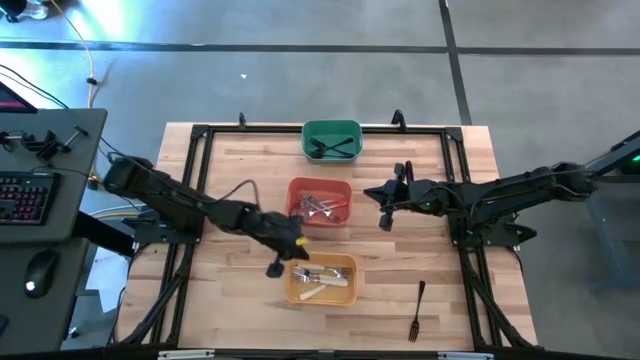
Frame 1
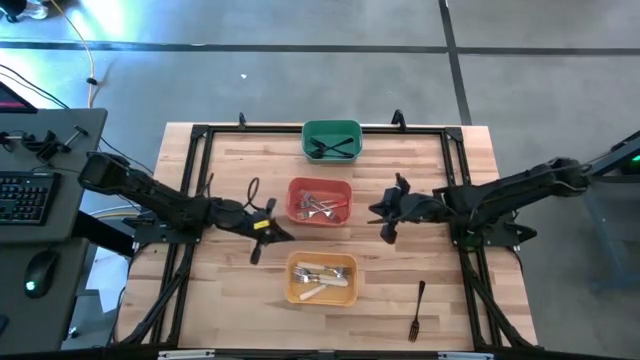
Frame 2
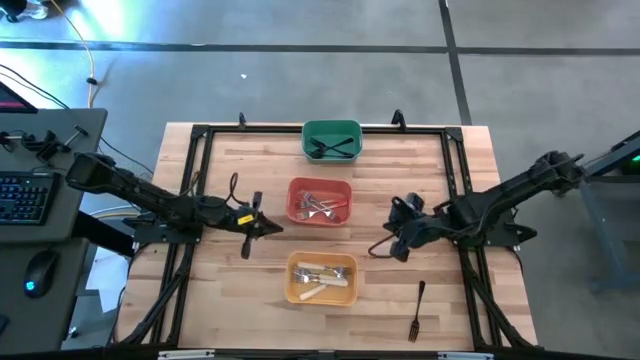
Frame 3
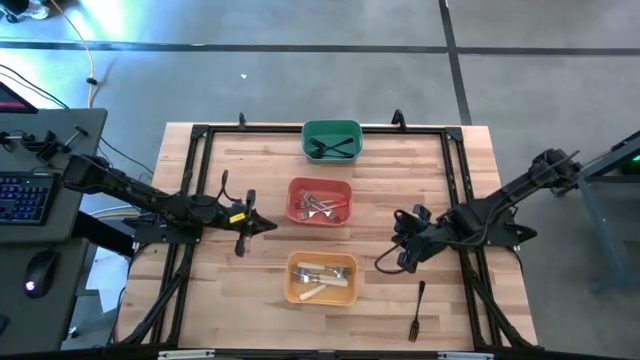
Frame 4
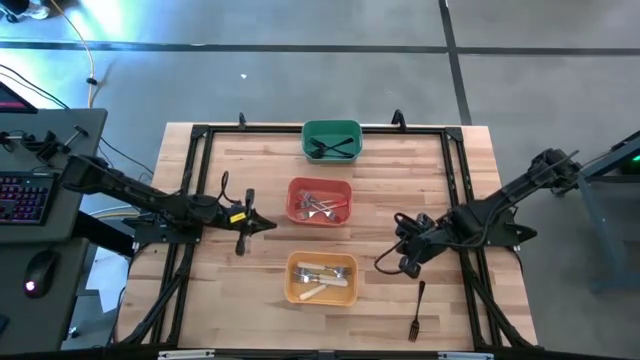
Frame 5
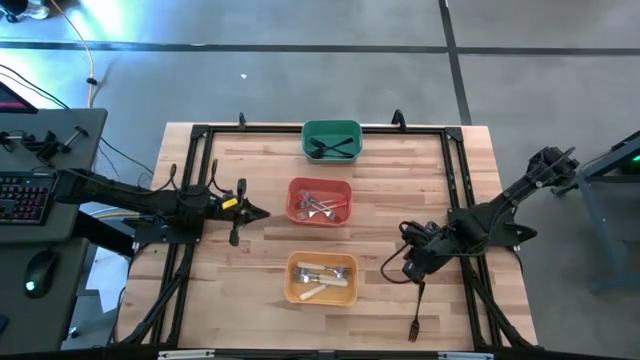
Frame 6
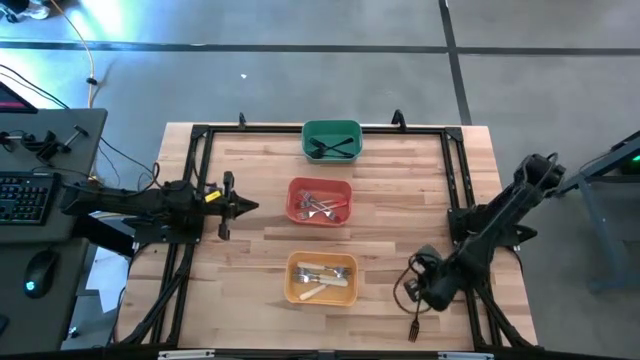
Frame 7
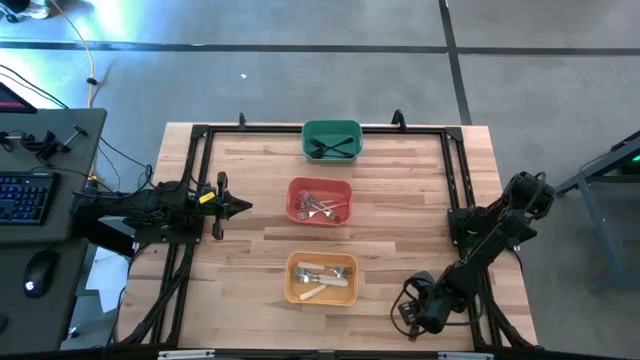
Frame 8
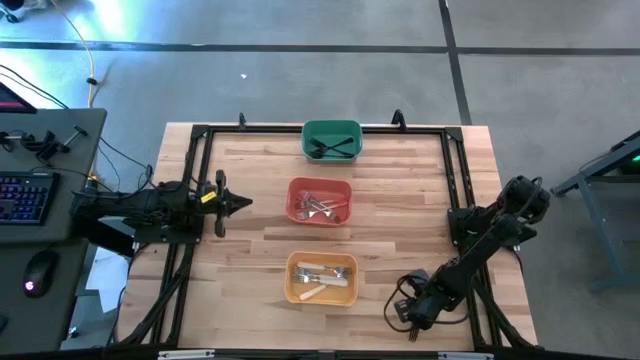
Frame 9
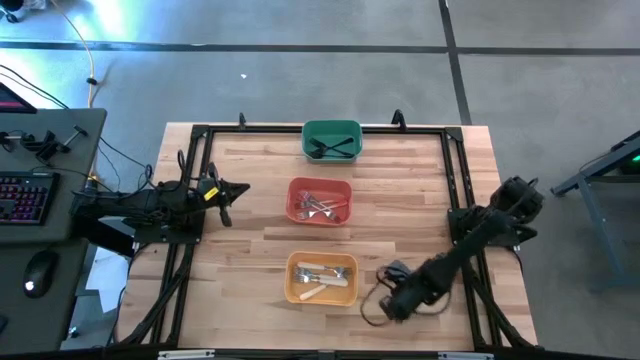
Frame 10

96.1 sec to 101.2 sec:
Task: Sort silverware by color (type)
Put the black fork into the green bin

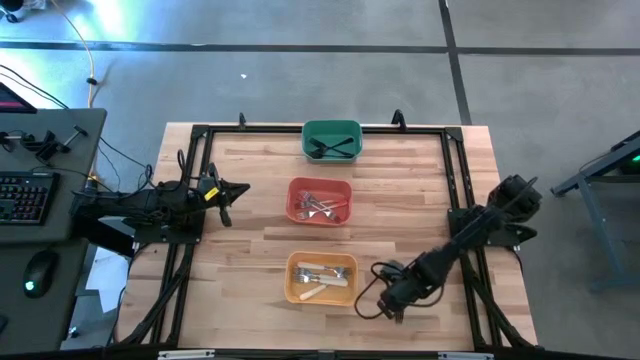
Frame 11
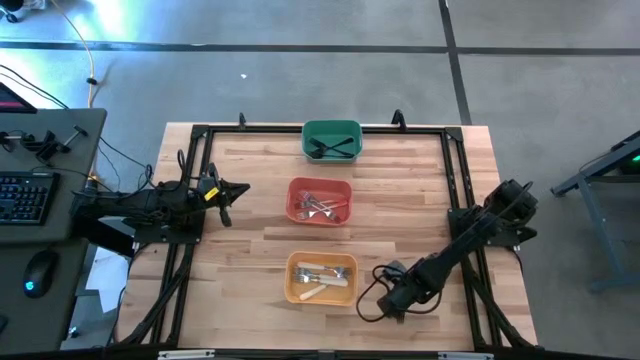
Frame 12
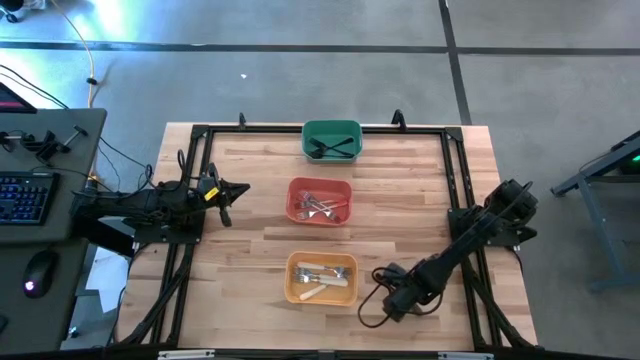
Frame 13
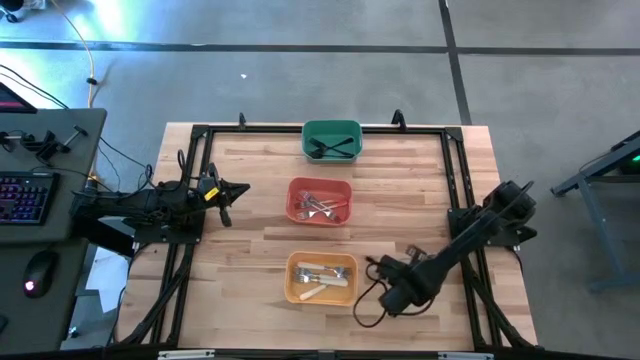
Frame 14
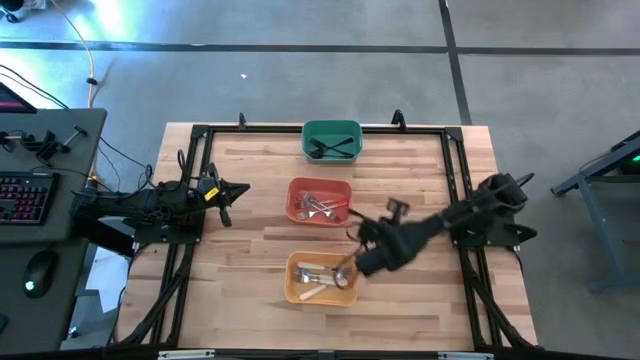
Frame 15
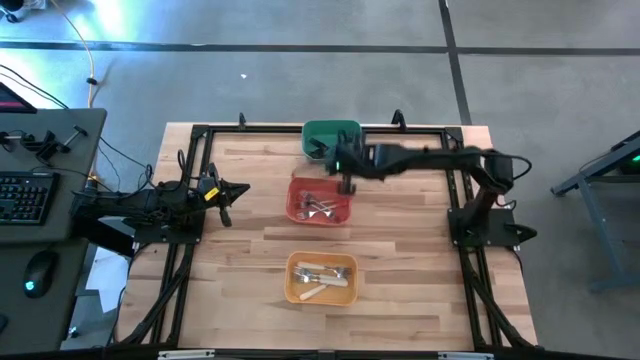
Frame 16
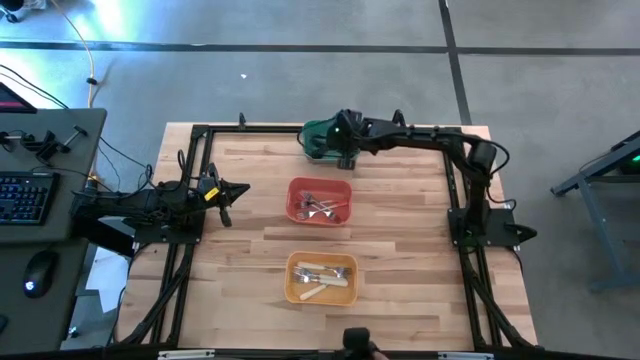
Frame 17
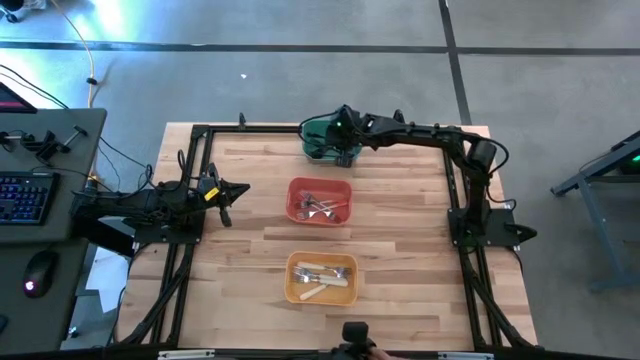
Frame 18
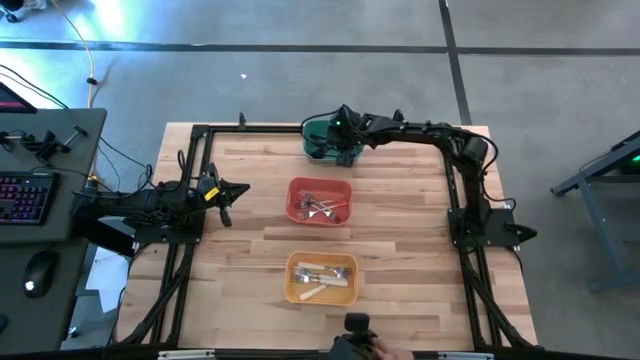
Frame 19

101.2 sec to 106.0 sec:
Put the black fork into the green bin

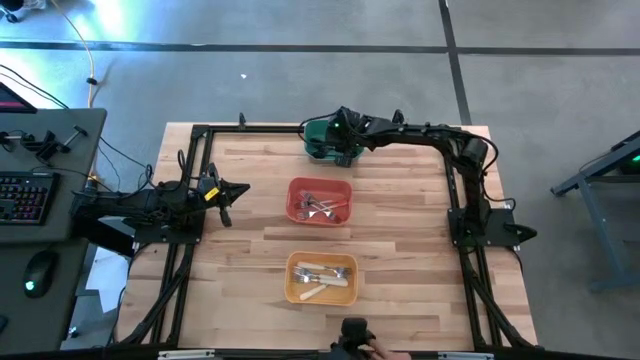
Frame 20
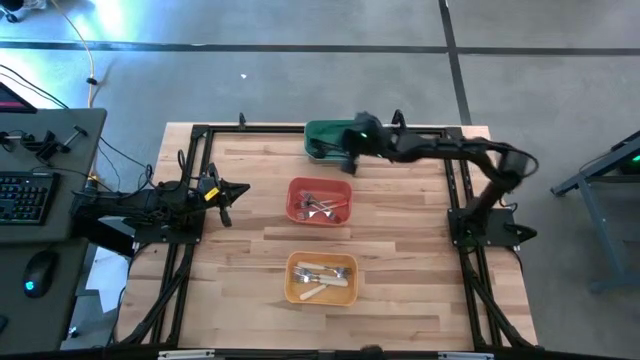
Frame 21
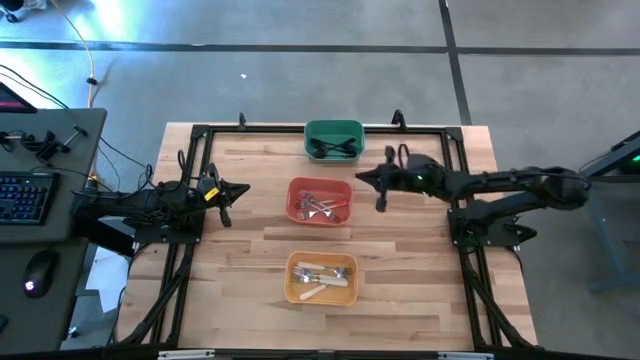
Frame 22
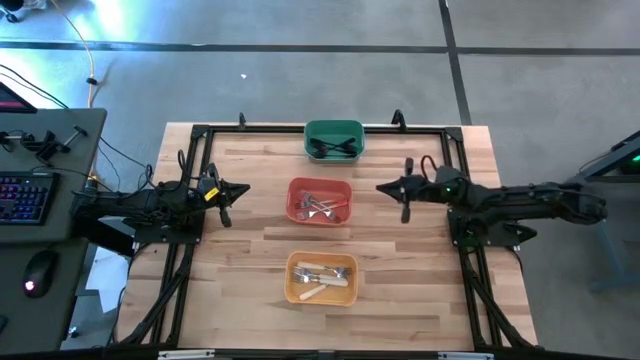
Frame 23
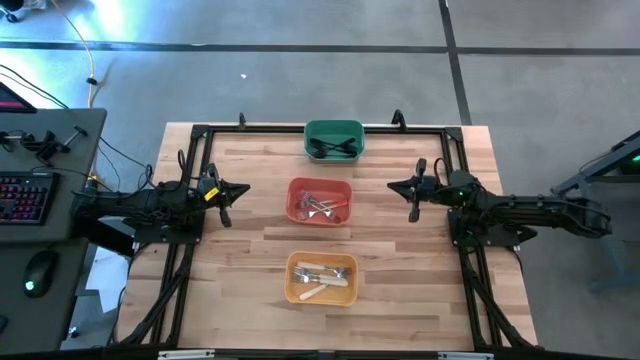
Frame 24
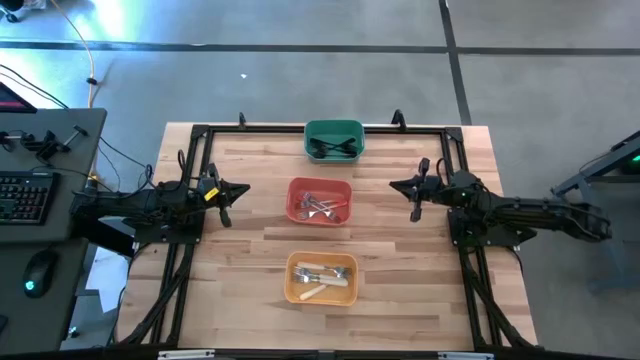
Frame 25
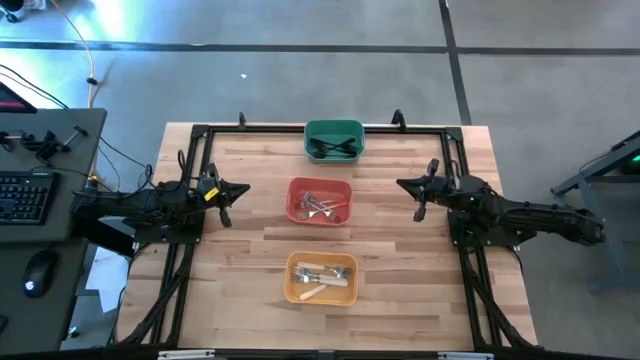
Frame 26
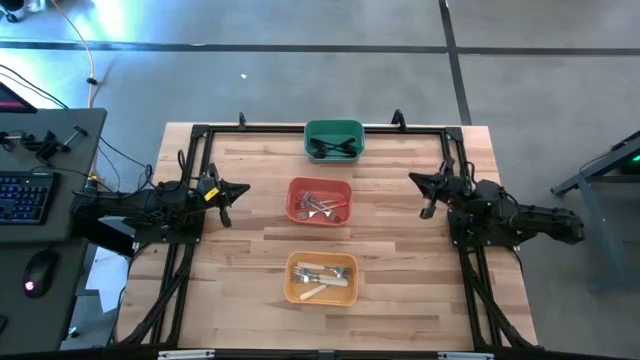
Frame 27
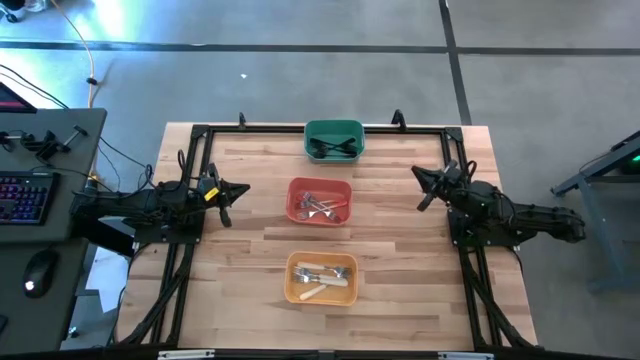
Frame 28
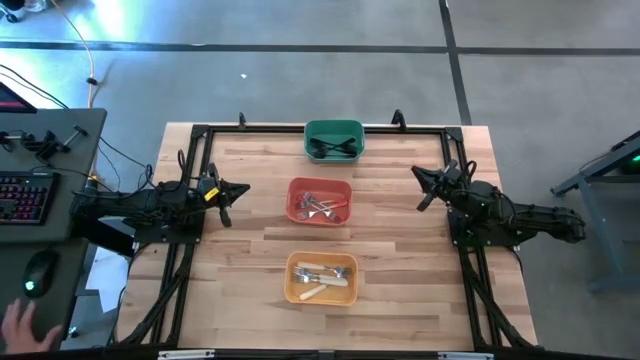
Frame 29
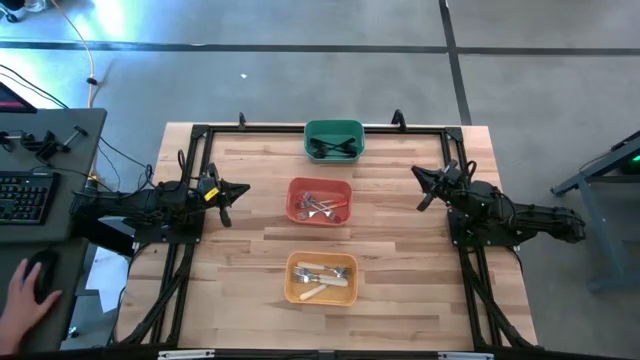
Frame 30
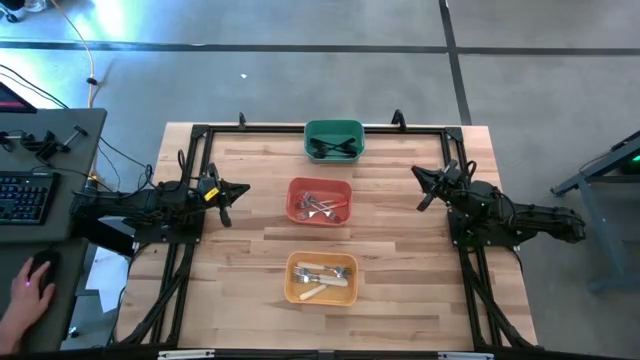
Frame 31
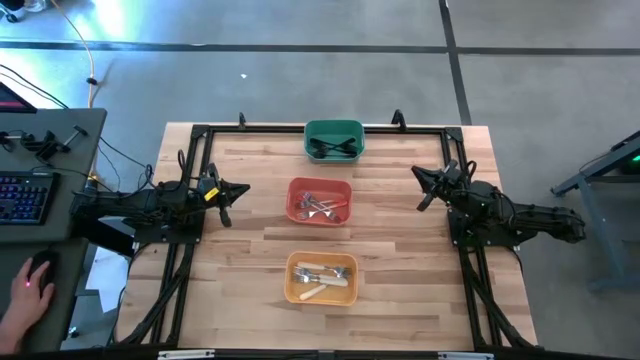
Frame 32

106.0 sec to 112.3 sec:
Return to Home Position

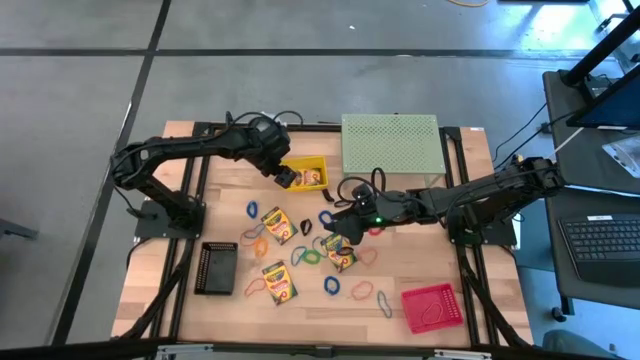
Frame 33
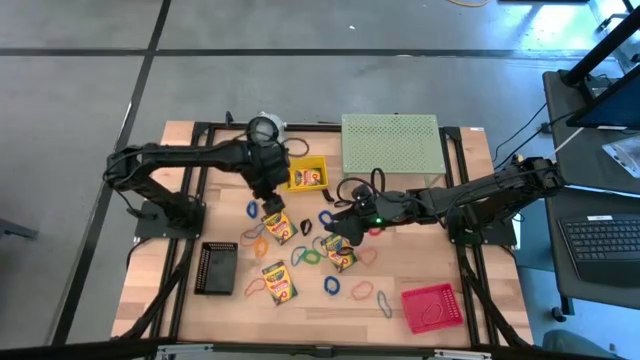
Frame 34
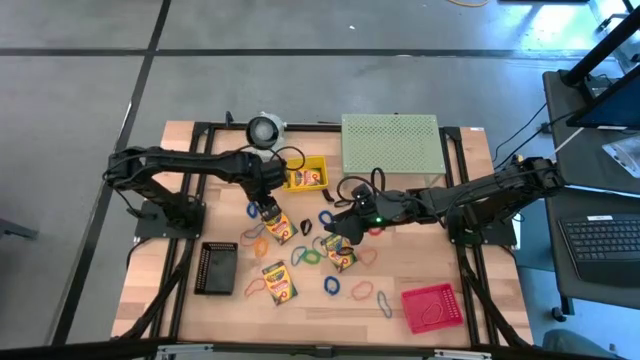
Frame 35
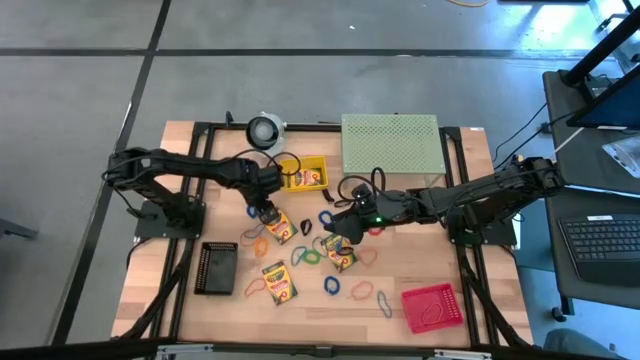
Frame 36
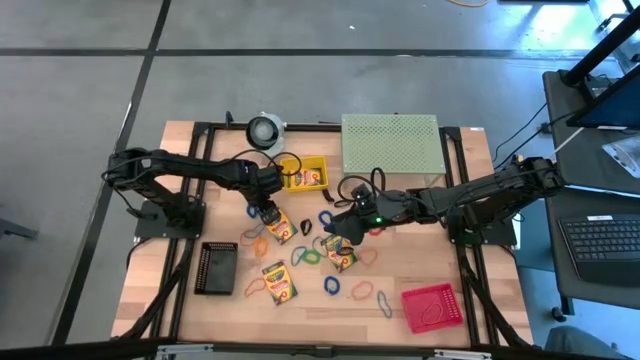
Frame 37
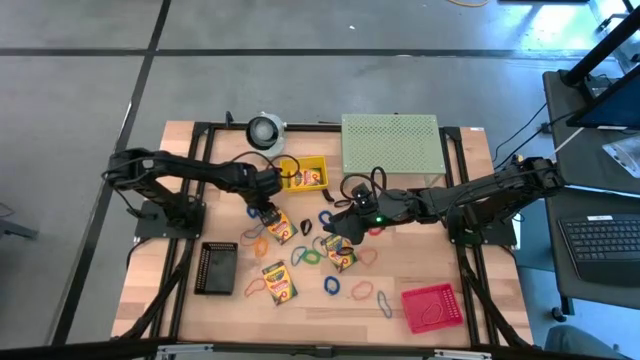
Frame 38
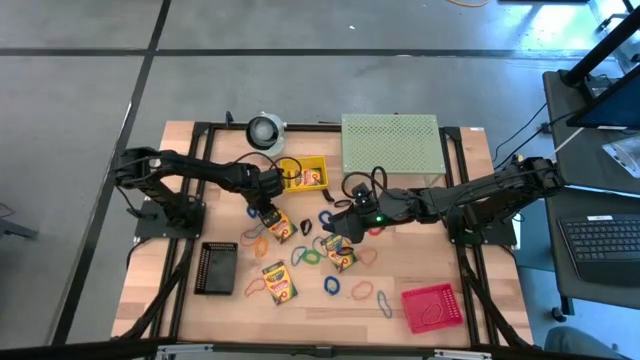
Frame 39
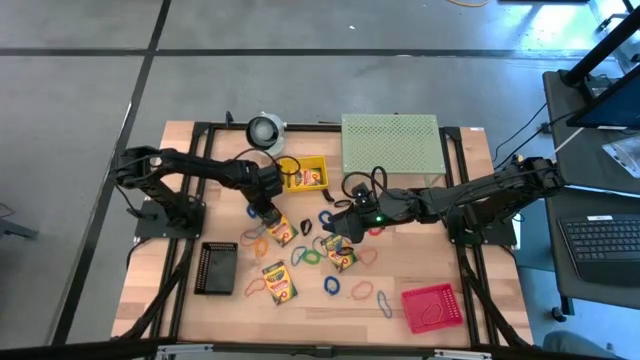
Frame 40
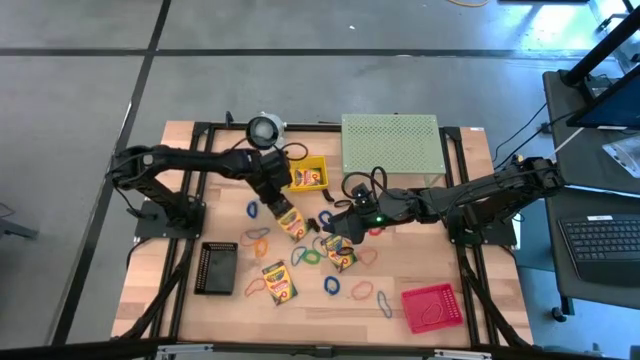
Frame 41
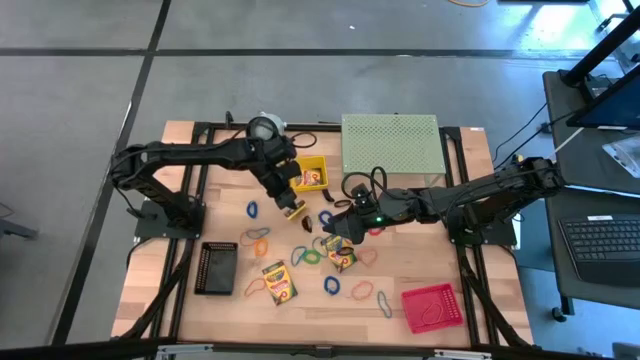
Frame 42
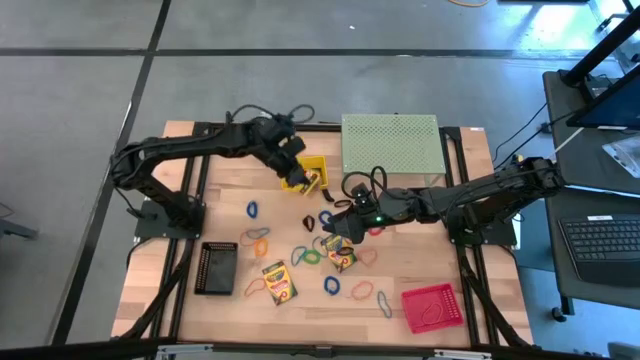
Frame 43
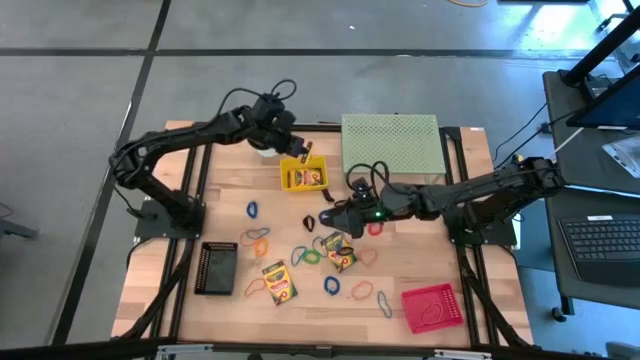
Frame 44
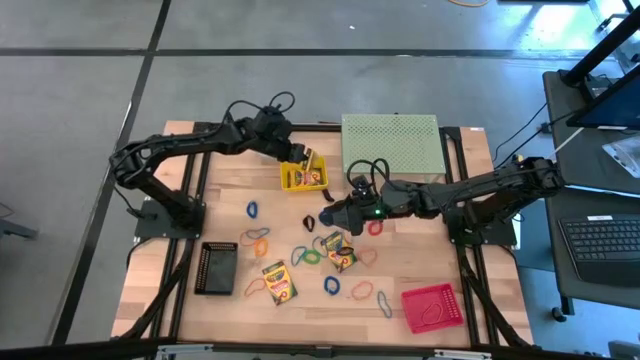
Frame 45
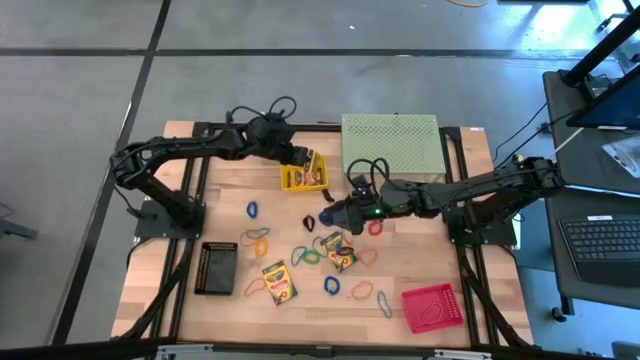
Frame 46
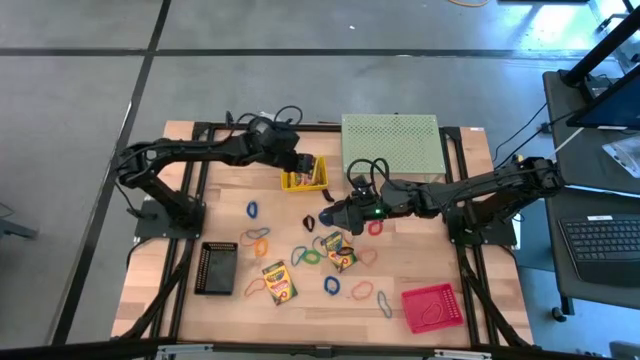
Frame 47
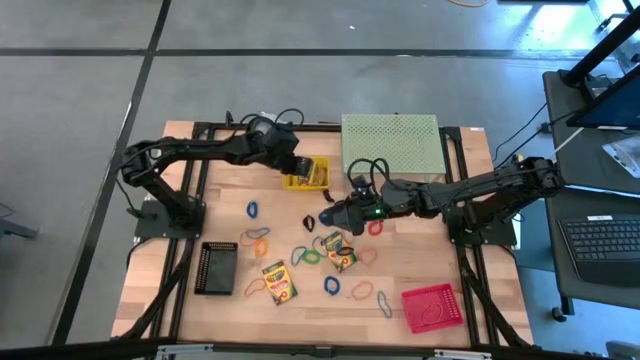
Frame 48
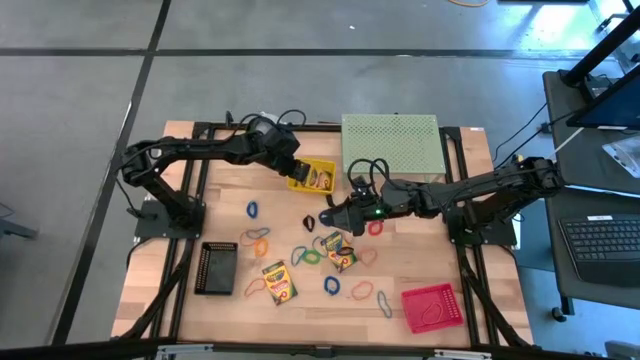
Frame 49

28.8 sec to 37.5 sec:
Task: Pick & Place Office Desk Supplies
Put the crayon box into the yellow bin
